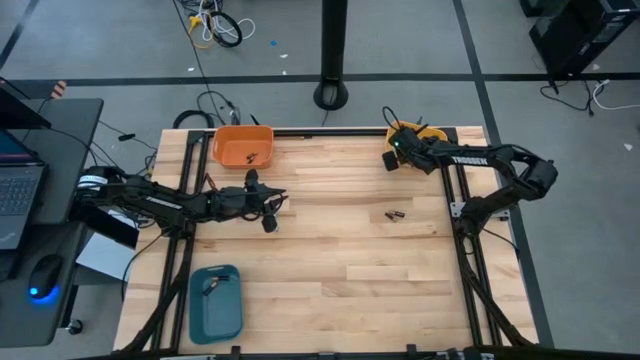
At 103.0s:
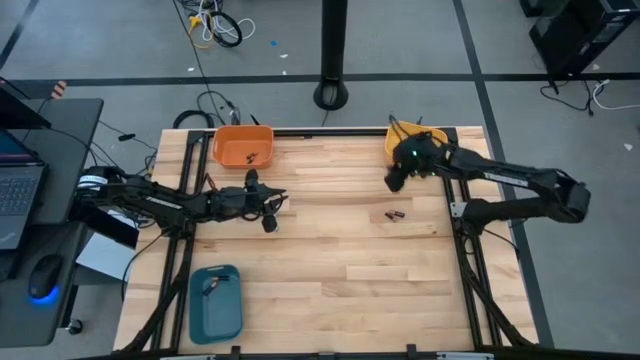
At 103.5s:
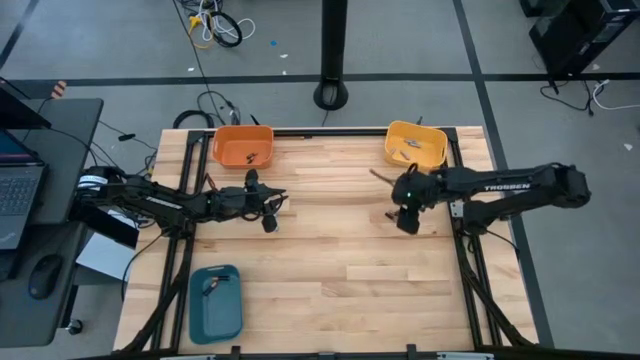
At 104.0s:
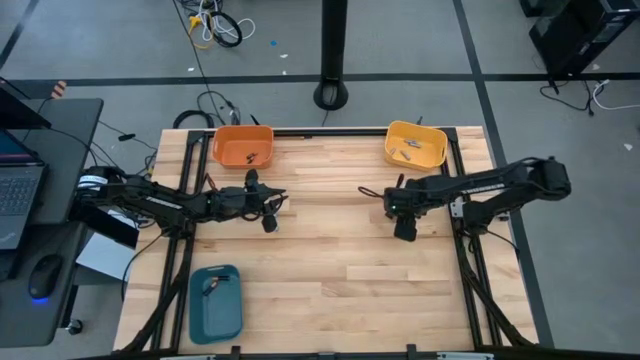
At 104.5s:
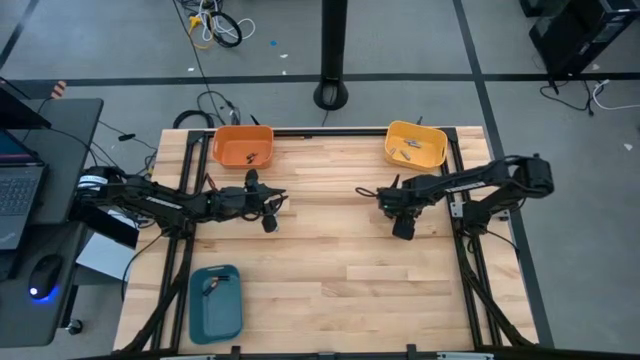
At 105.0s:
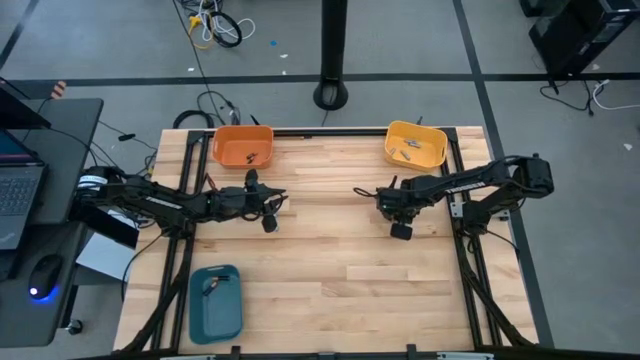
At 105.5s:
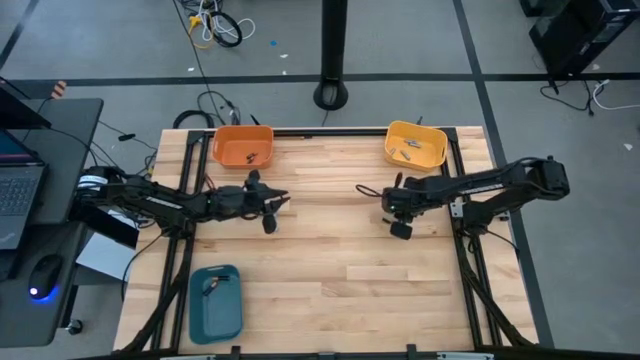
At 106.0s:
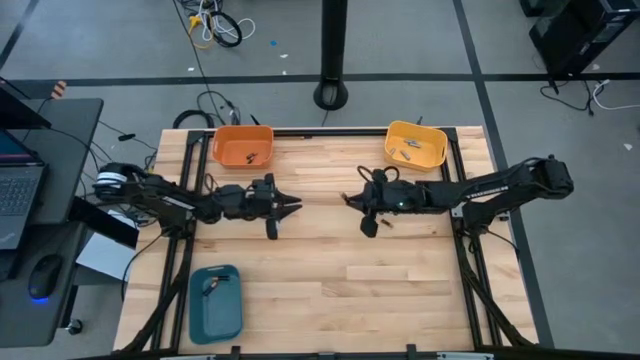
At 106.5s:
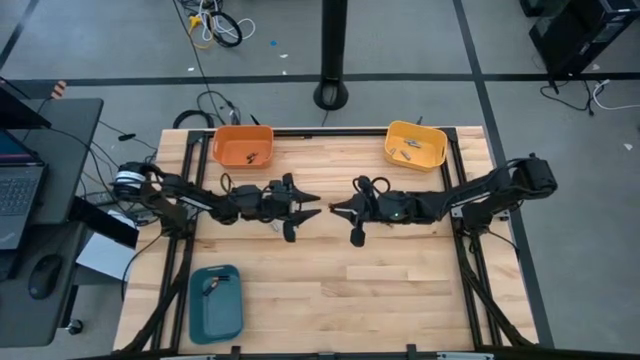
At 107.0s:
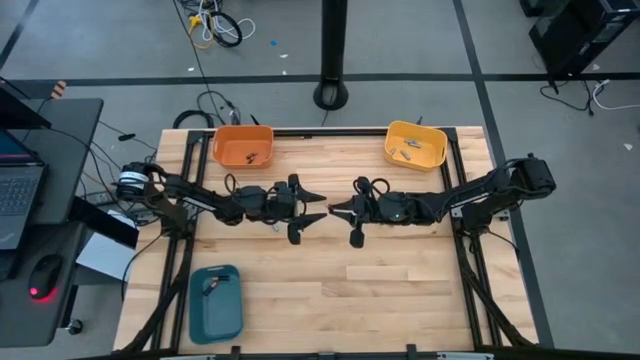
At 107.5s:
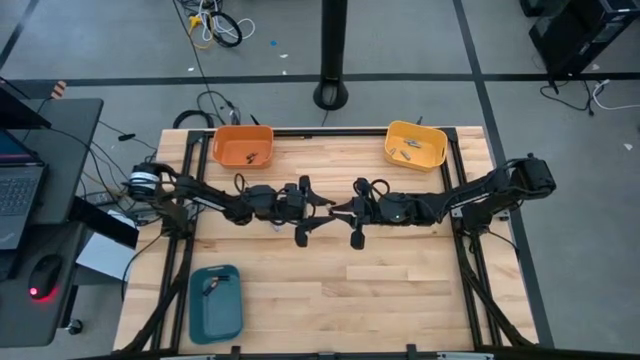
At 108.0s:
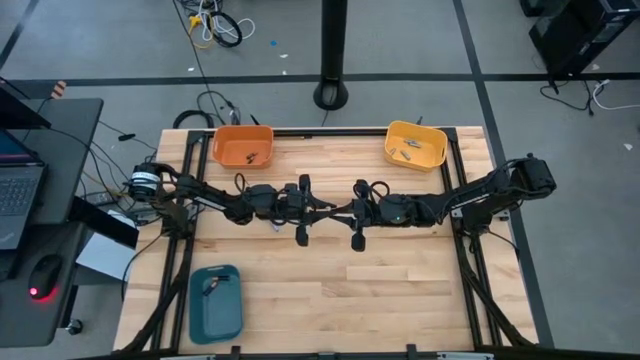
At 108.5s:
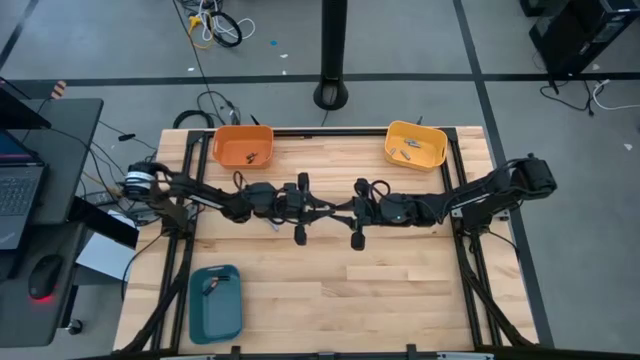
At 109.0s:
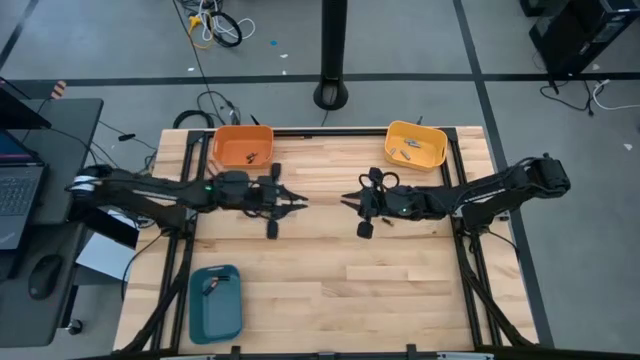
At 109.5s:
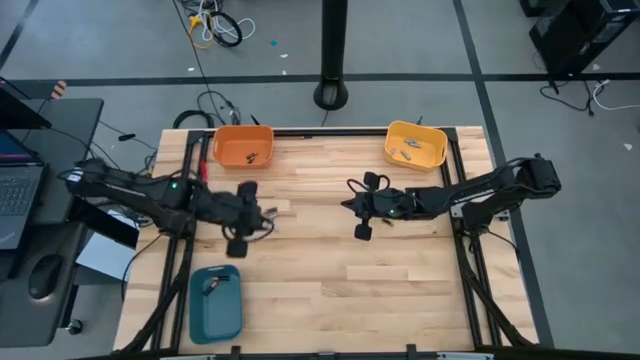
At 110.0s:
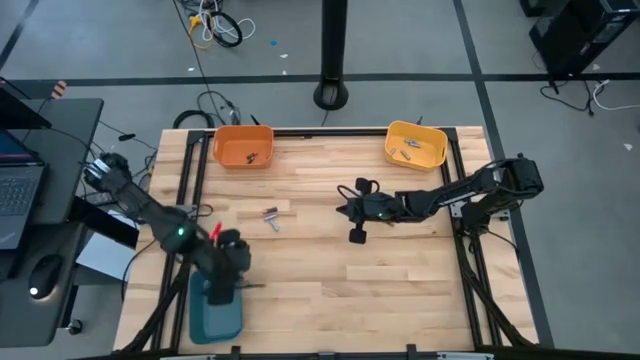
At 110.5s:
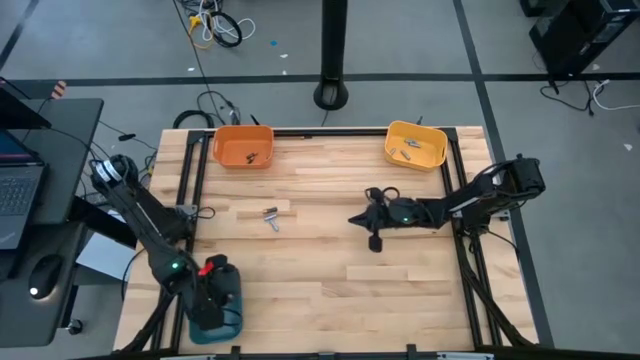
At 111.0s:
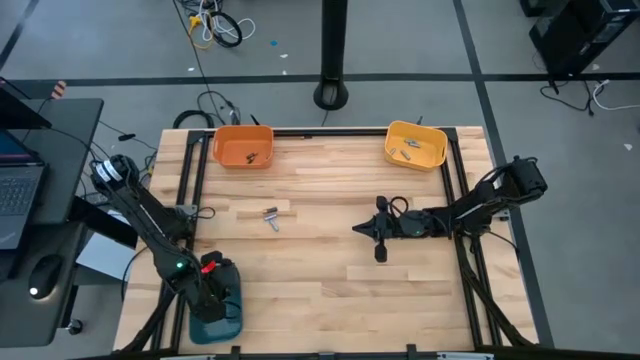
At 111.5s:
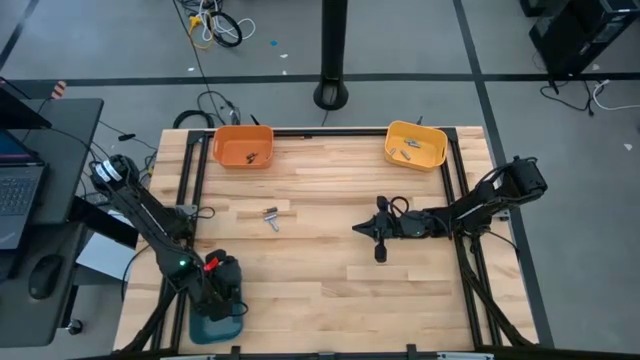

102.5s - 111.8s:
Task: Sort batteries
Put the big copper and black battery into the blue bin

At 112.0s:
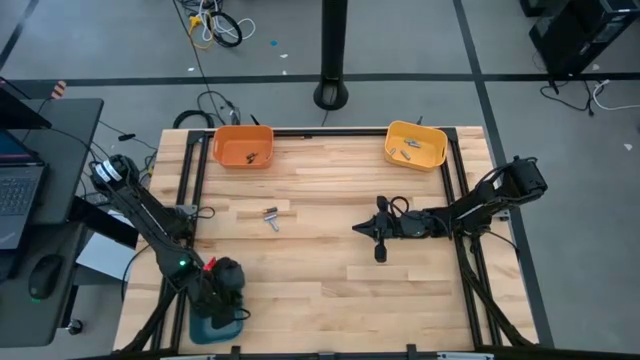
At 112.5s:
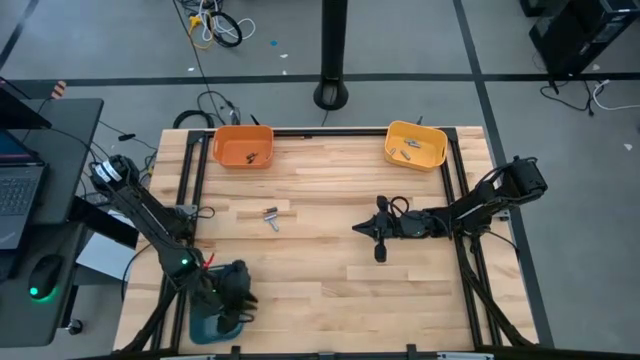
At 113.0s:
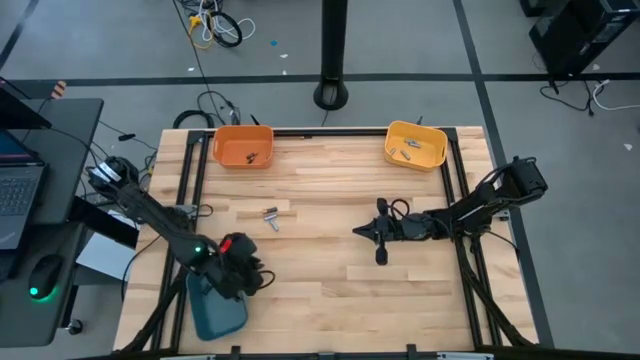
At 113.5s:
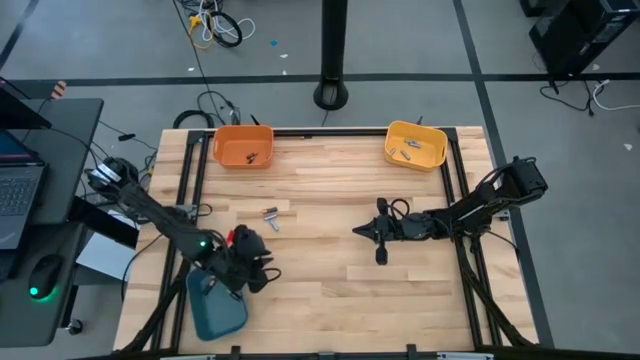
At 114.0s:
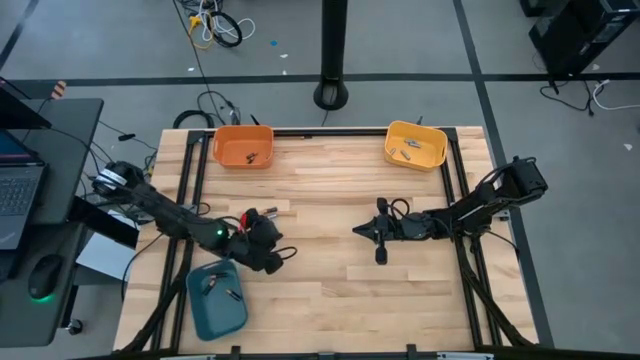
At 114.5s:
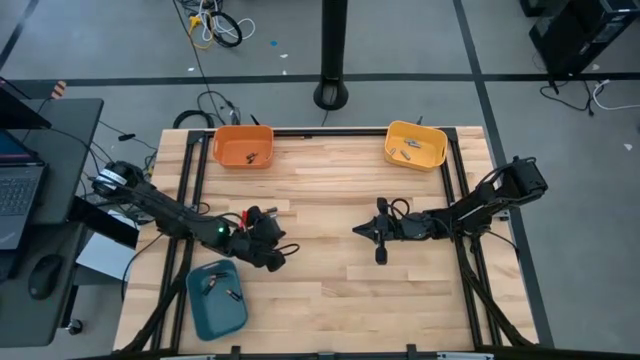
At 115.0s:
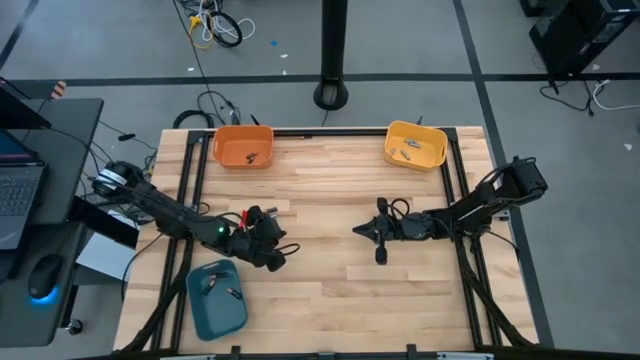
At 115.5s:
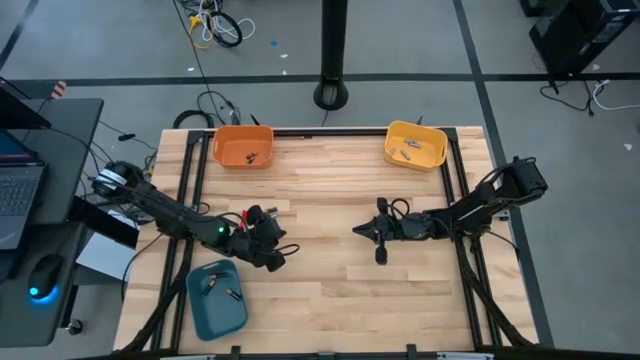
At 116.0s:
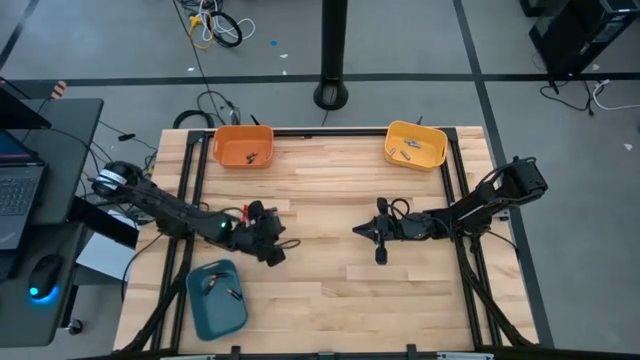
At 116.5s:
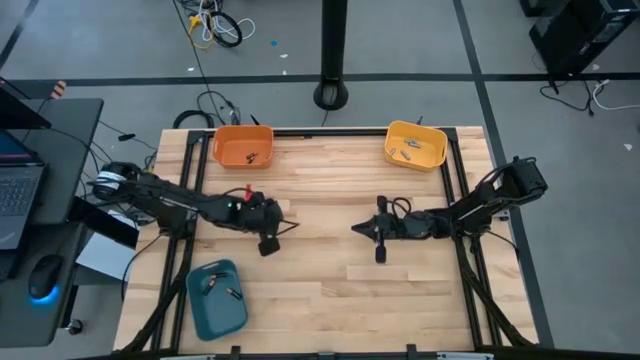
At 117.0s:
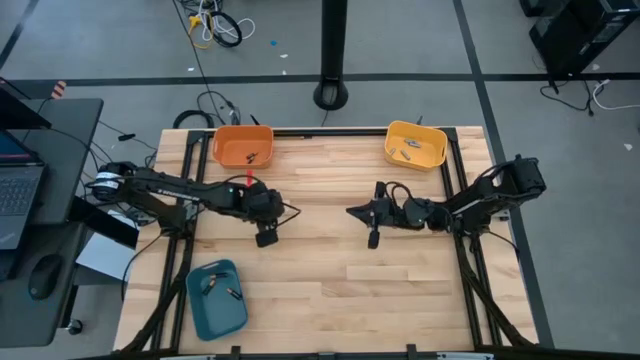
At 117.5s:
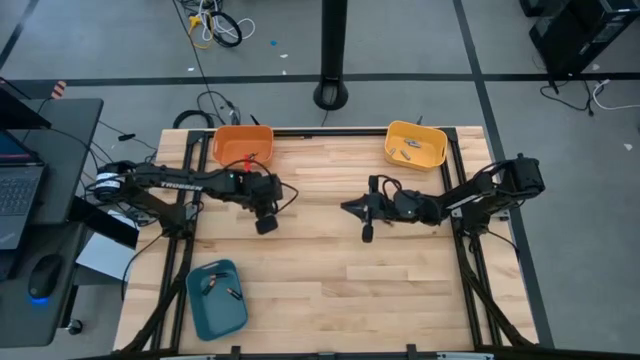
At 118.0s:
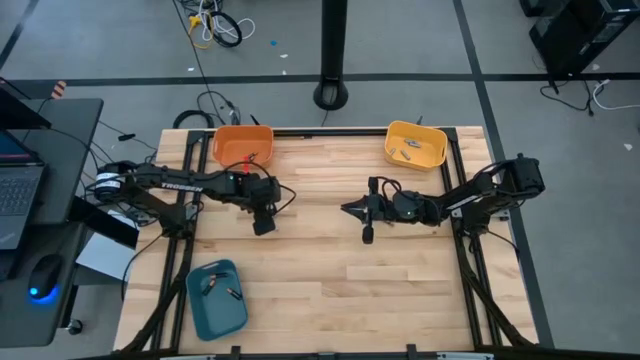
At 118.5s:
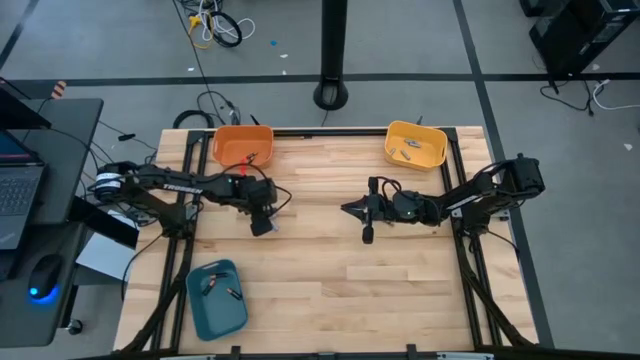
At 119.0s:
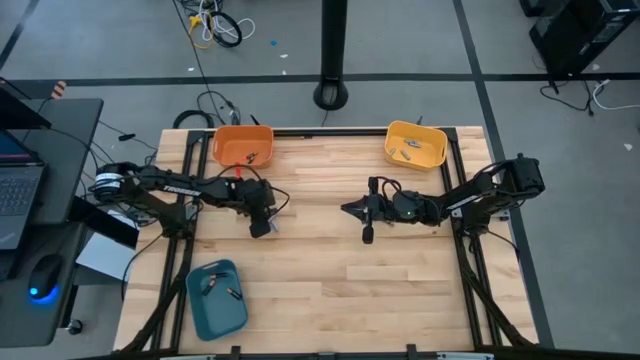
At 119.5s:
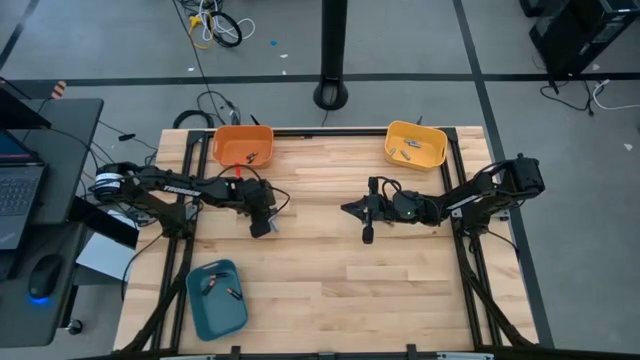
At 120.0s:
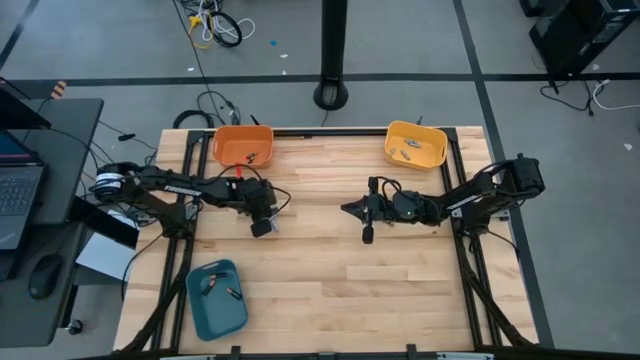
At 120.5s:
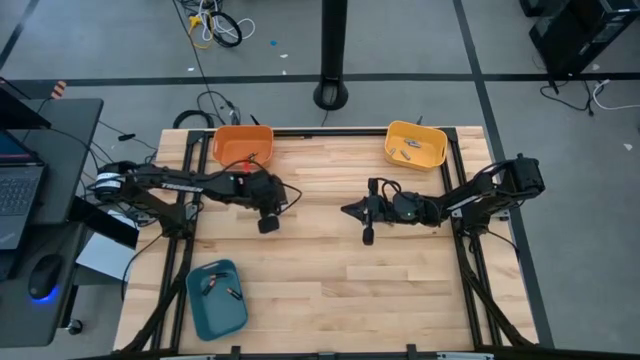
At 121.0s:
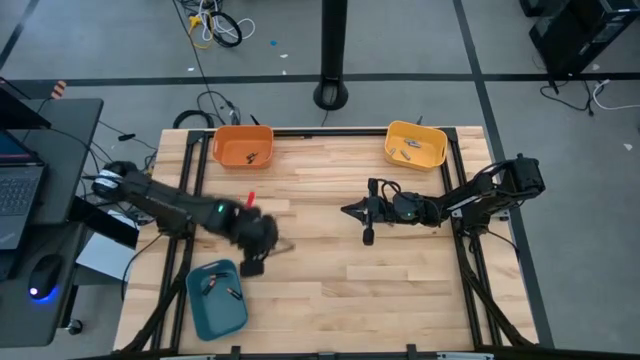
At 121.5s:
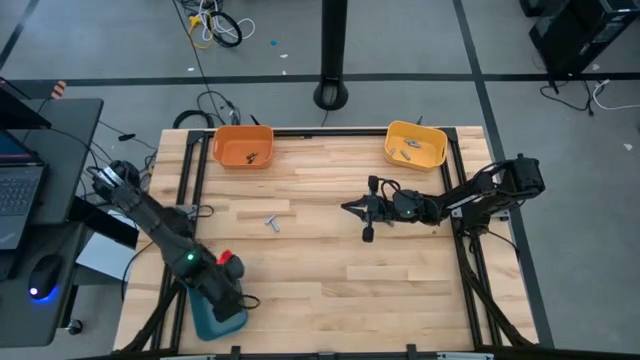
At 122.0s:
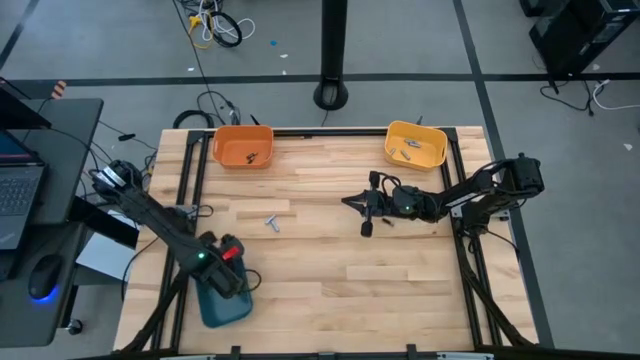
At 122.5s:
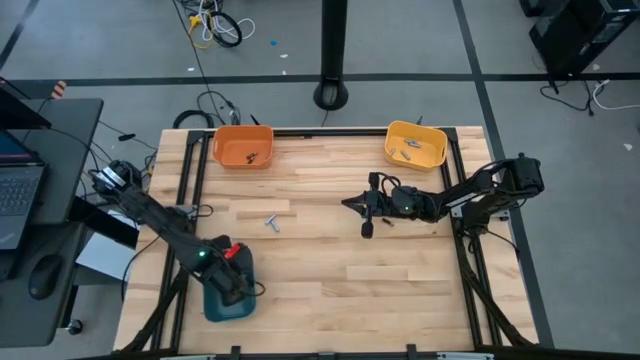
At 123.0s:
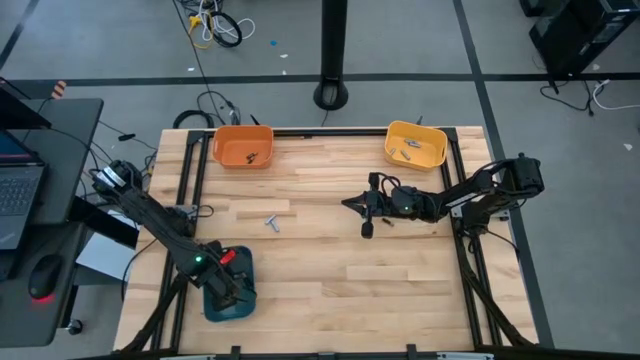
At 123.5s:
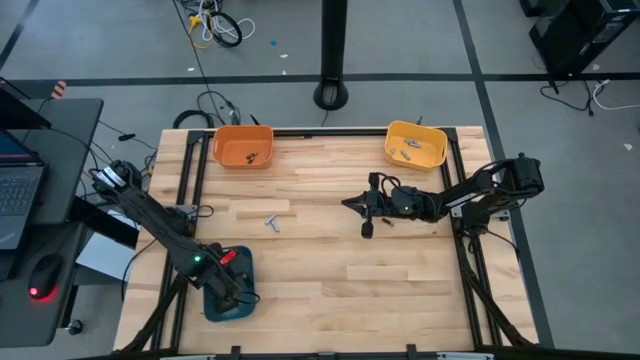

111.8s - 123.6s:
Put the big copper and black battery into the blue bin
